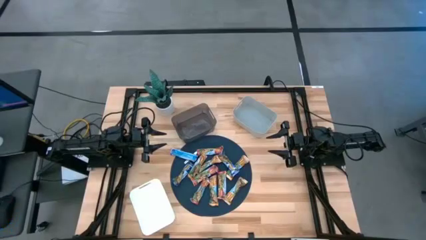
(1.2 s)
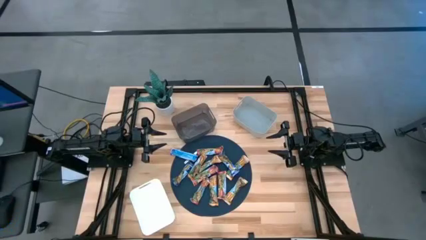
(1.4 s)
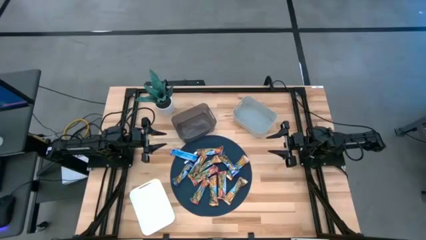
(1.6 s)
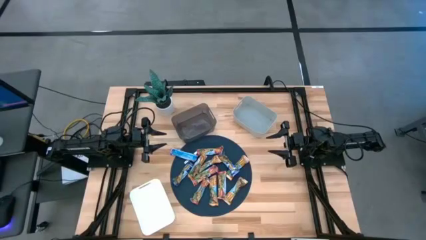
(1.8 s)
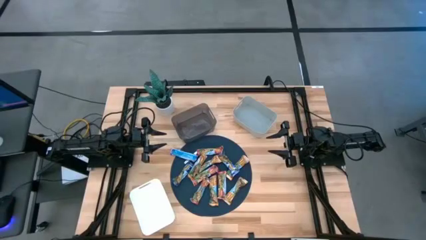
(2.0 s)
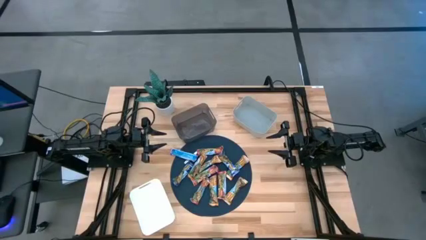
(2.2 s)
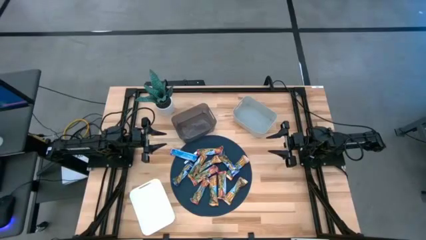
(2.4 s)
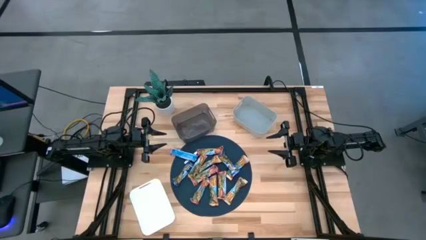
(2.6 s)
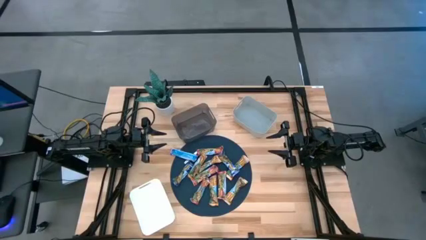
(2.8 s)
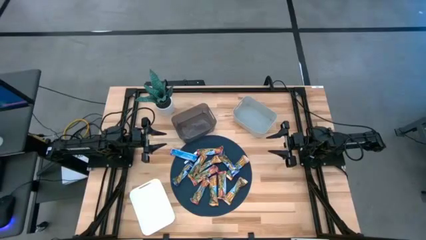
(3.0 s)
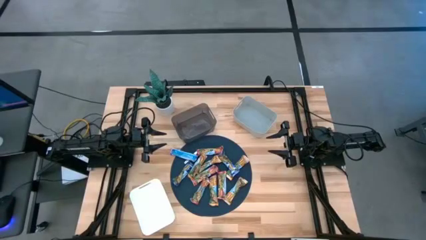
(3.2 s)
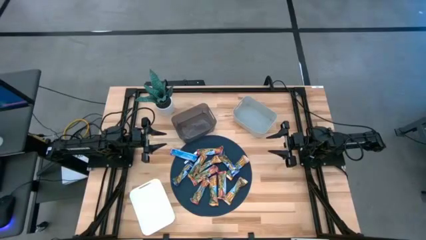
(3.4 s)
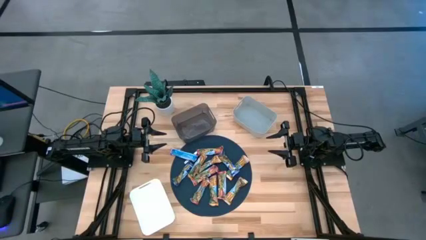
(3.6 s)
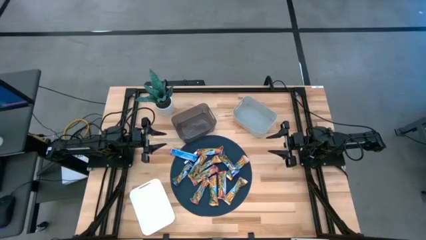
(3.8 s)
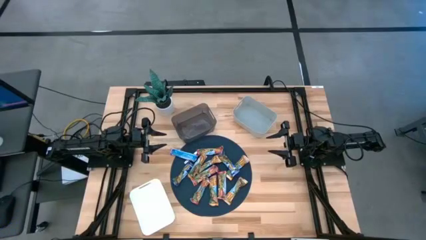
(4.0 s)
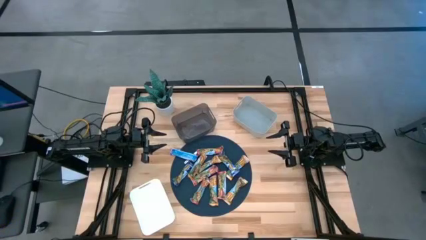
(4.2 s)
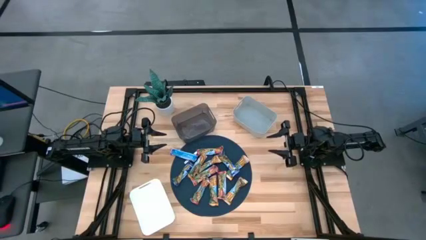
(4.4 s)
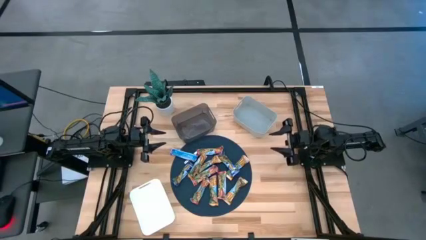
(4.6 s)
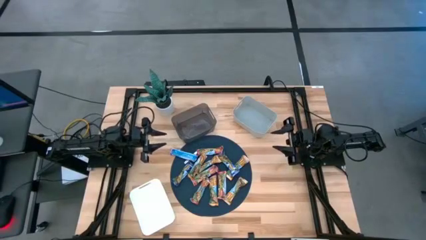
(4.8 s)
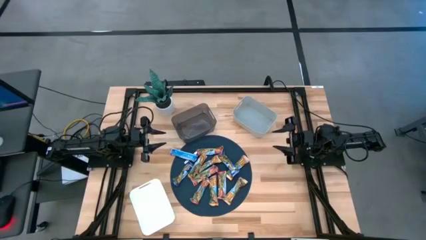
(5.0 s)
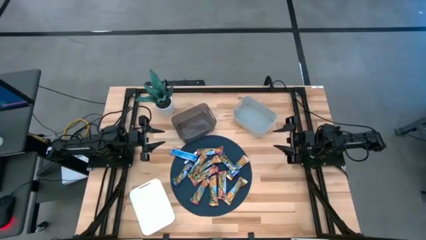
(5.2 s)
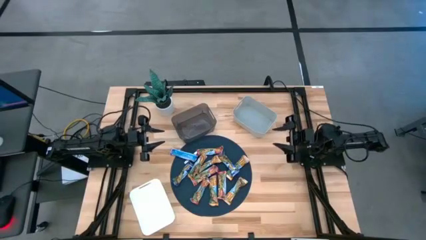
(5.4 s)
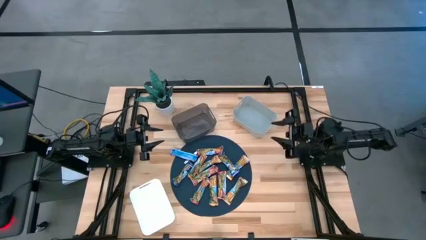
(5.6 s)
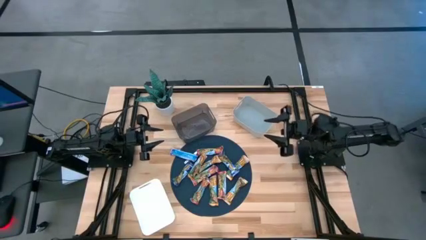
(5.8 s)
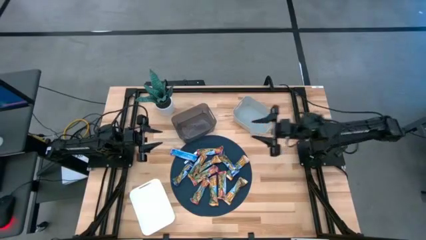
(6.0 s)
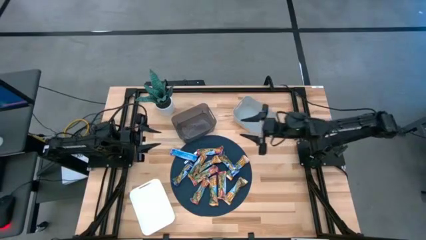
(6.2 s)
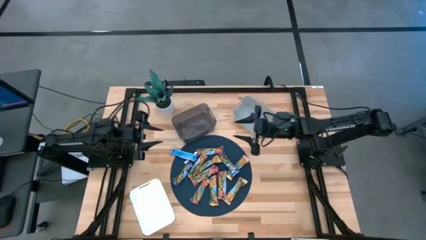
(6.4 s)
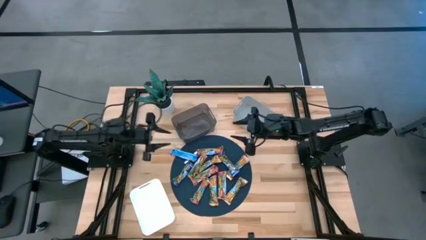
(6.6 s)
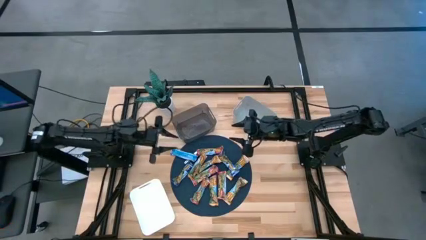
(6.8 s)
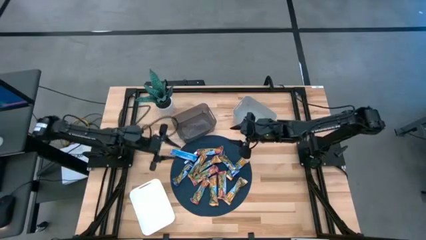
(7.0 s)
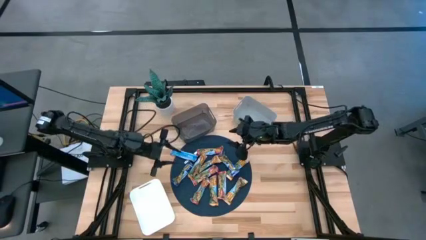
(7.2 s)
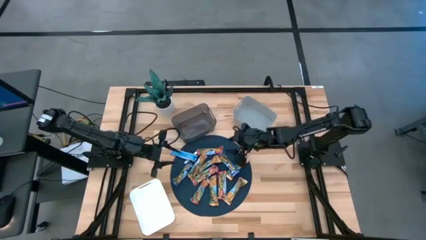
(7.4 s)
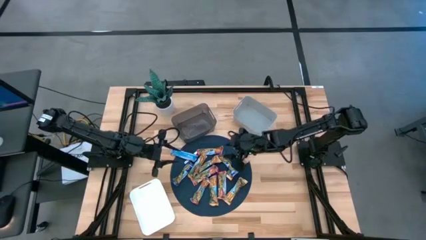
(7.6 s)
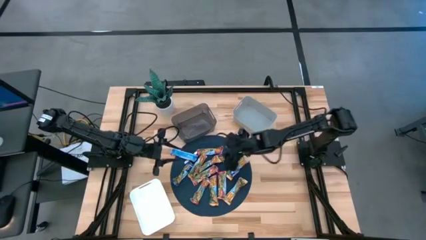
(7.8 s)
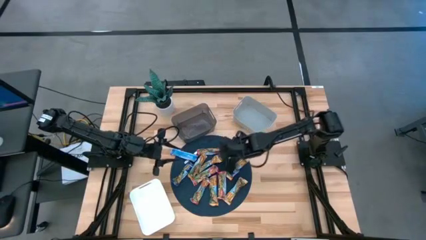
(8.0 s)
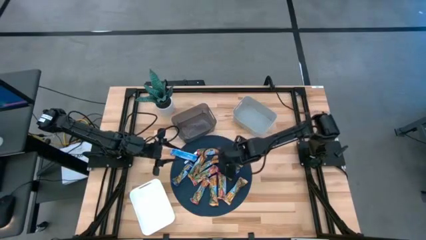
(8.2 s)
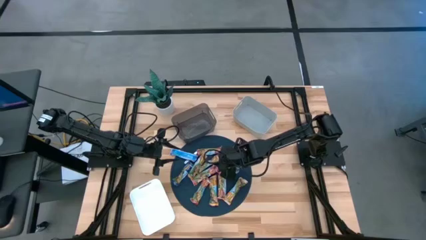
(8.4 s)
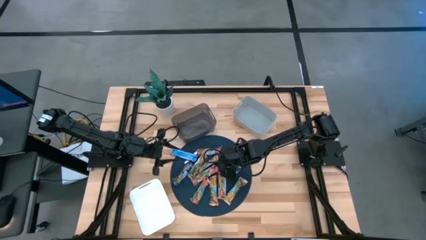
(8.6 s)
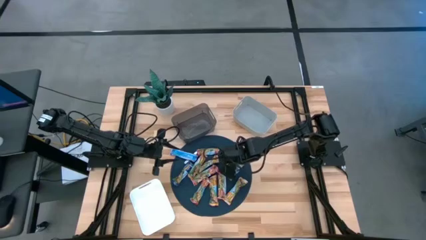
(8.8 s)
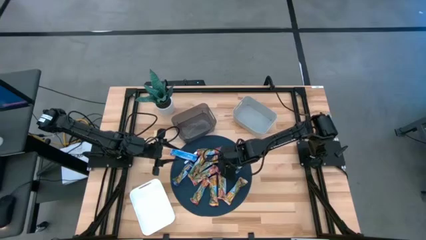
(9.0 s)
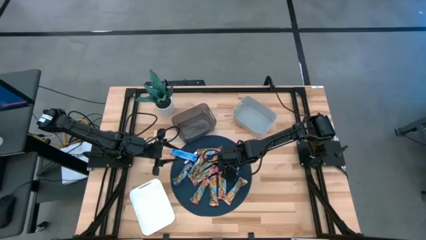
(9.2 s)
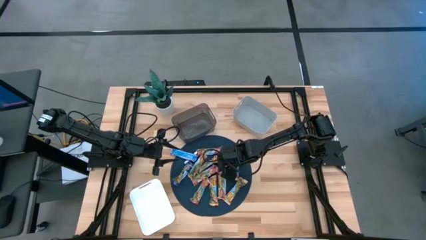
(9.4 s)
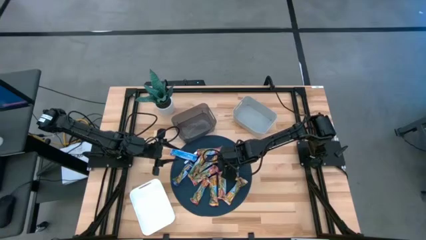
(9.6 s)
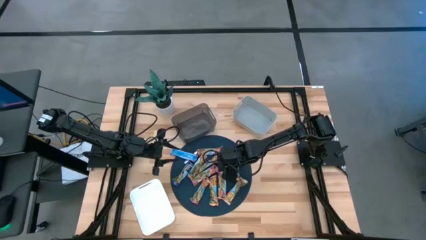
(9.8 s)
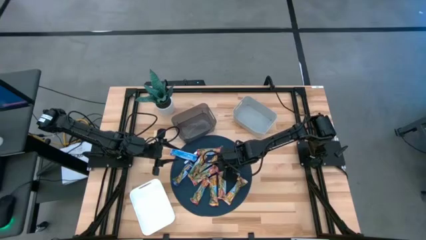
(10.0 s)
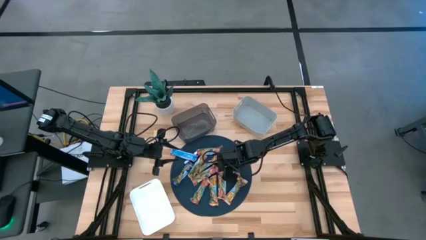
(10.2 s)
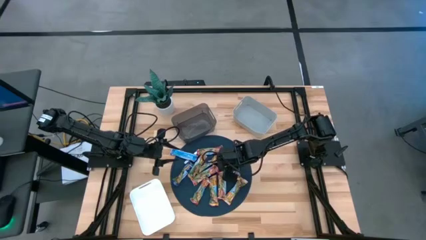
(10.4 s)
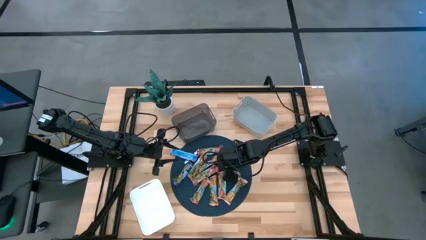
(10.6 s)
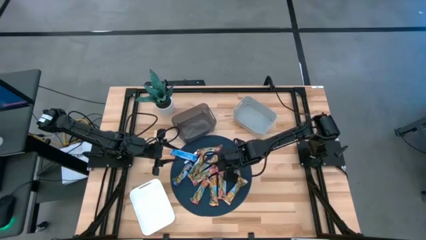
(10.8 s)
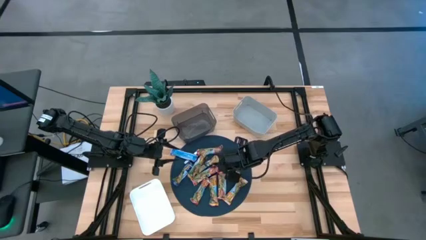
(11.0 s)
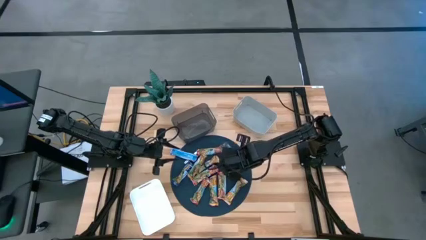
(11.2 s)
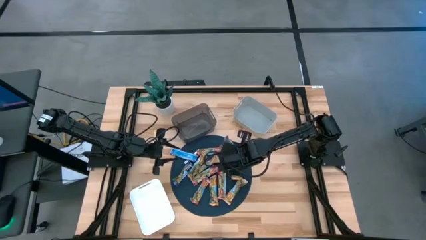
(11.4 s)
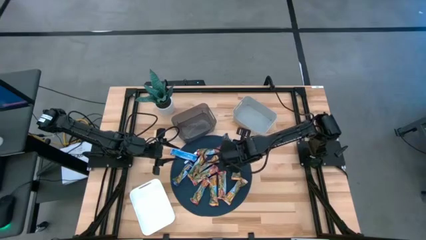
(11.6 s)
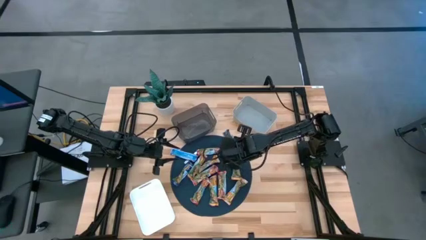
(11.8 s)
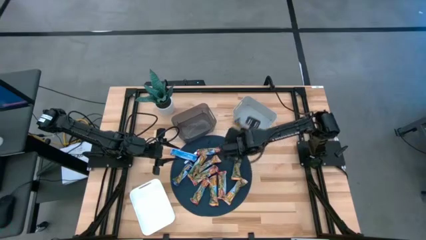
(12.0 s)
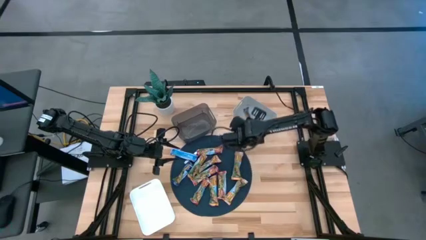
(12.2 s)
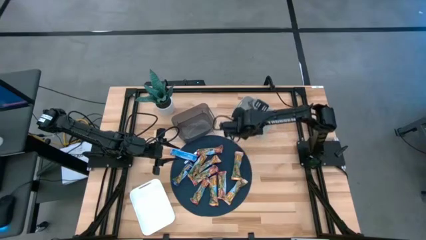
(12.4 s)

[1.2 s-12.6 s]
Task: Pick and place Granola Bars by type
Put the blue granola bar into the gray bin

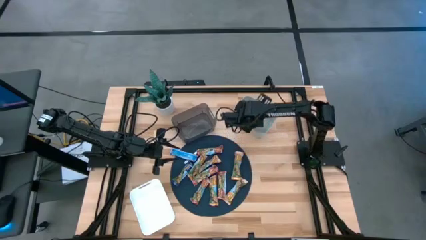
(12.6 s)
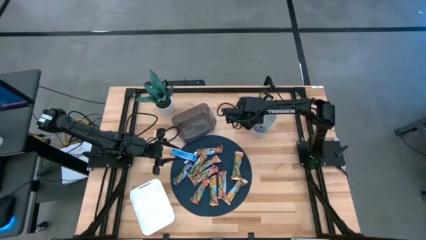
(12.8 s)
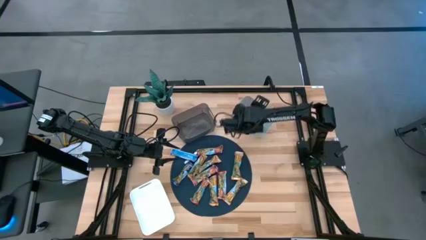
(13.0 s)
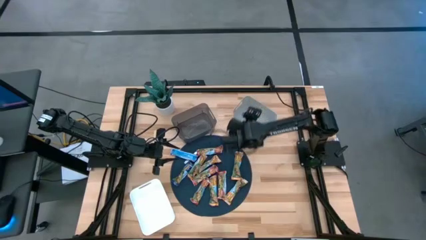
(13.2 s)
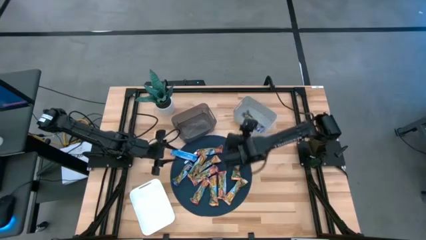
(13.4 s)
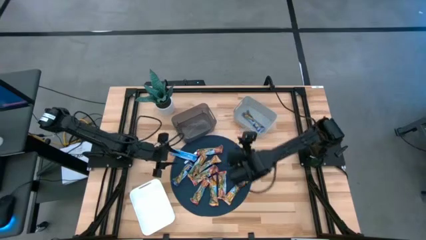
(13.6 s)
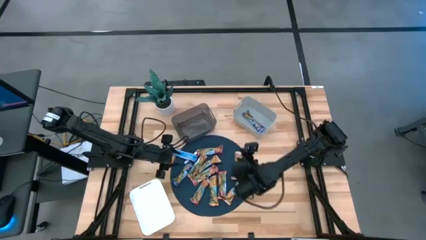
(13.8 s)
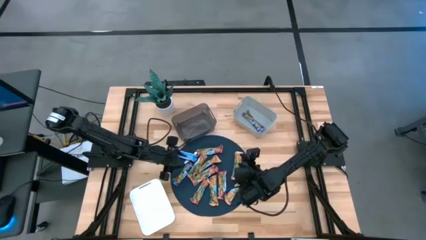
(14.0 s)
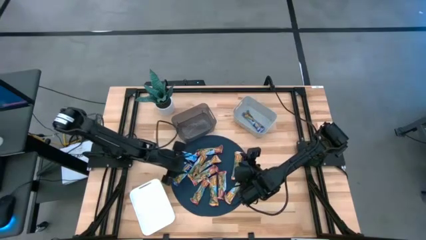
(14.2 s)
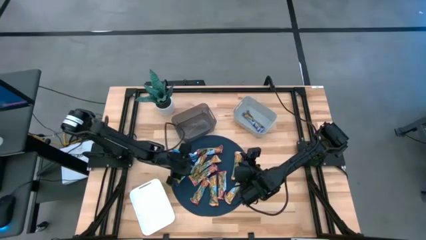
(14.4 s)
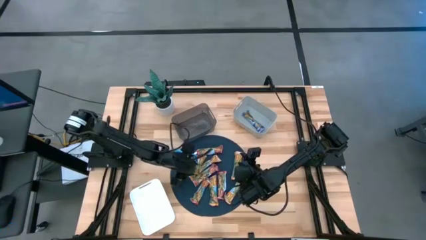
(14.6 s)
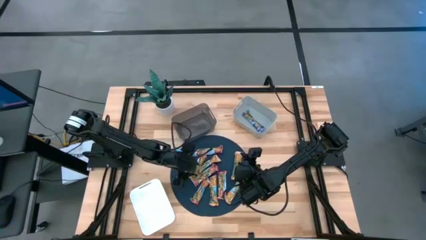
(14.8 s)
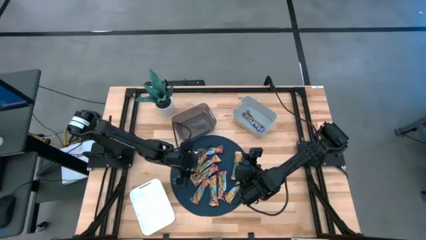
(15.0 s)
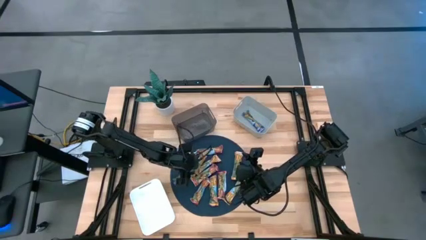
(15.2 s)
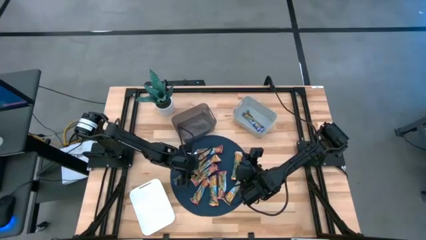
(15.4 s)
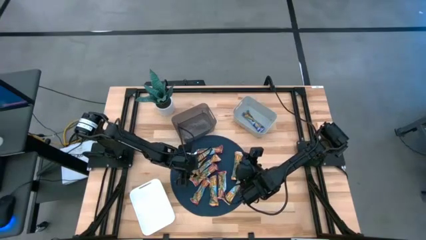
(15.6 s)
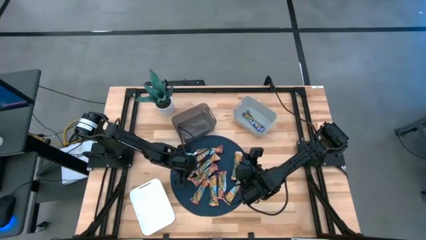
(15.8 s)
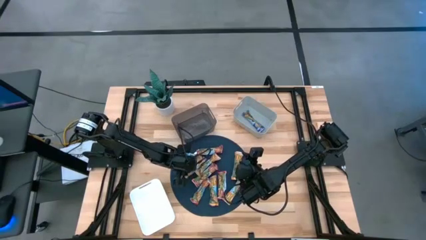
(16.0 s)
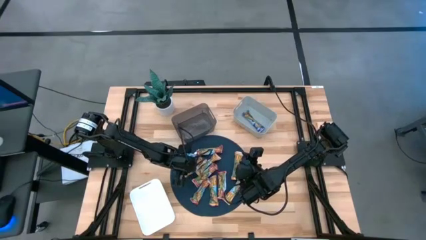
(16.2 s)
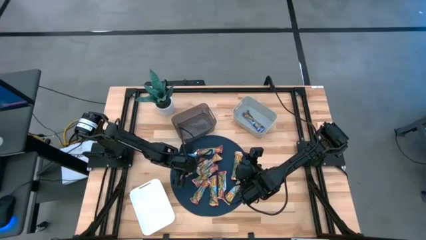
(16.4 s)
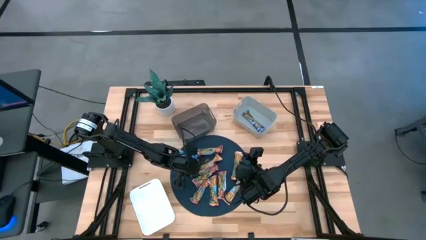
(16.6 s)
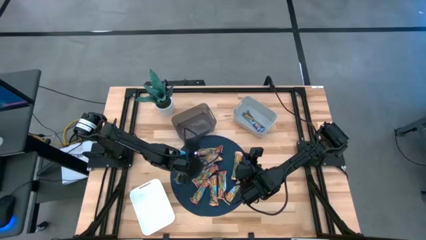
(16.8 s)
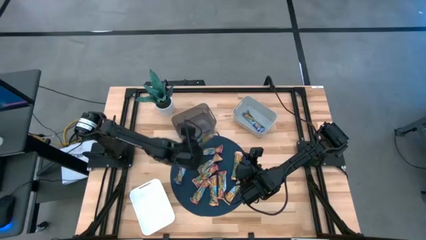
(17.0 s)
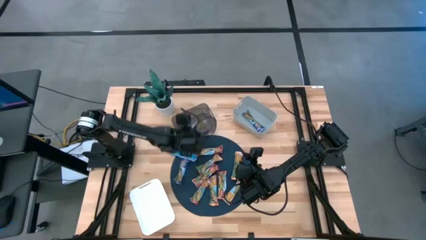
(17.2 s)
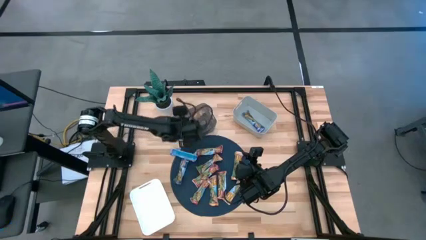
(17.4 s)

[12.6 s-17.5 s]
Put the yellow granola bar into the black bin
